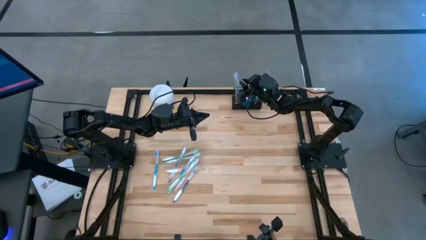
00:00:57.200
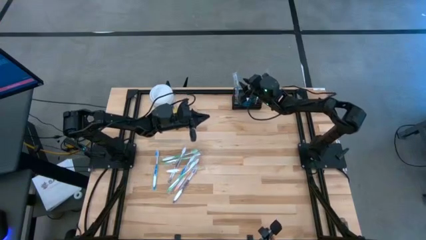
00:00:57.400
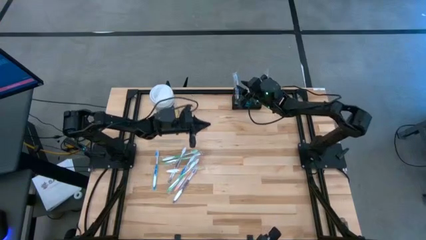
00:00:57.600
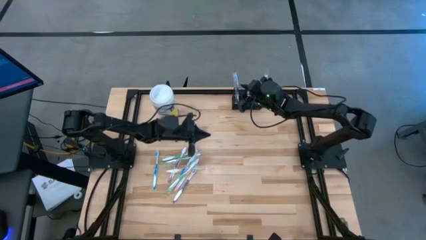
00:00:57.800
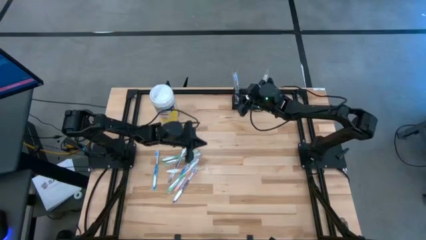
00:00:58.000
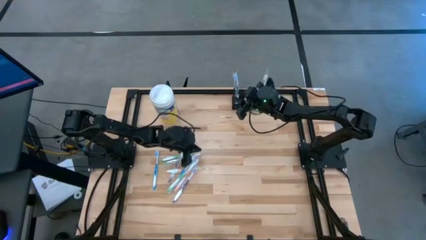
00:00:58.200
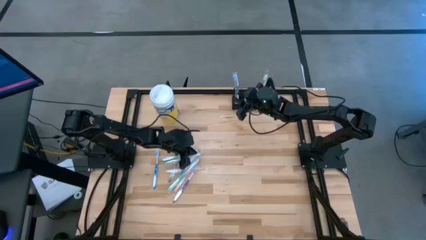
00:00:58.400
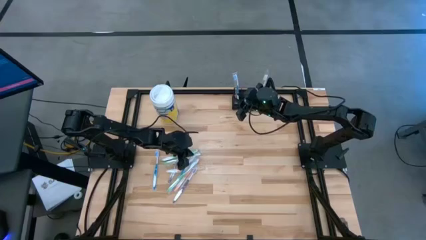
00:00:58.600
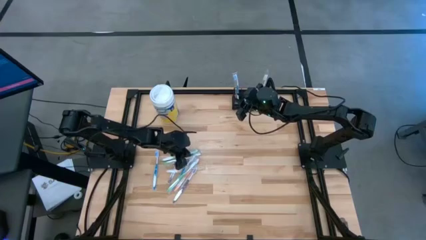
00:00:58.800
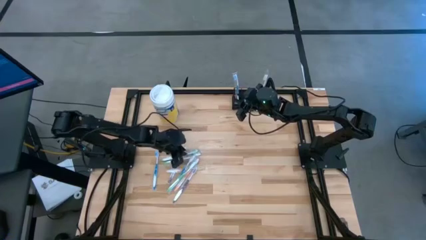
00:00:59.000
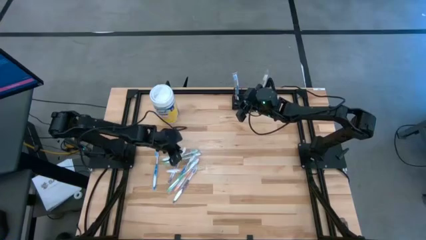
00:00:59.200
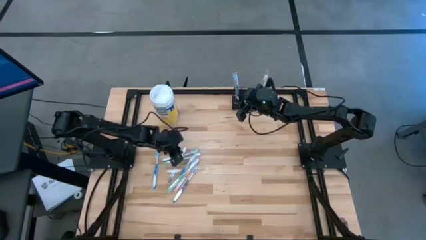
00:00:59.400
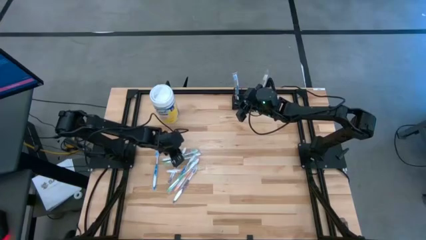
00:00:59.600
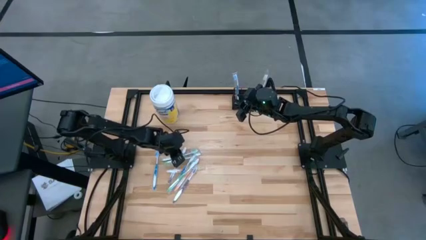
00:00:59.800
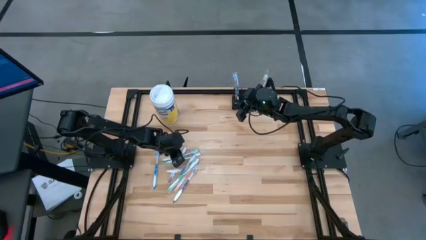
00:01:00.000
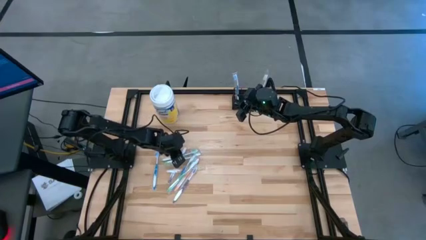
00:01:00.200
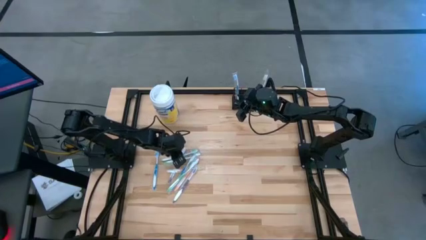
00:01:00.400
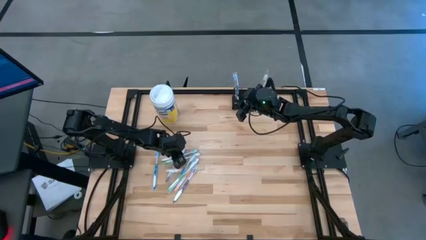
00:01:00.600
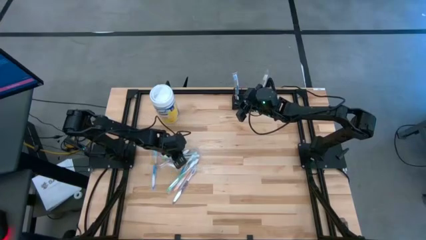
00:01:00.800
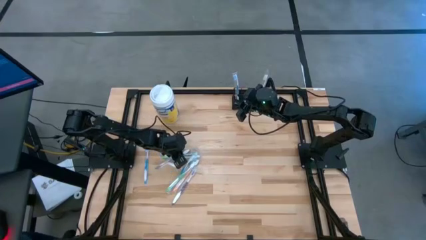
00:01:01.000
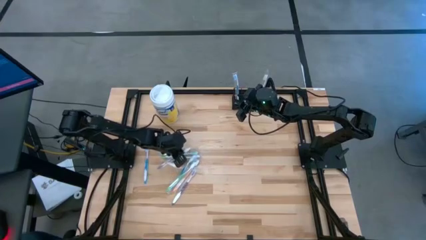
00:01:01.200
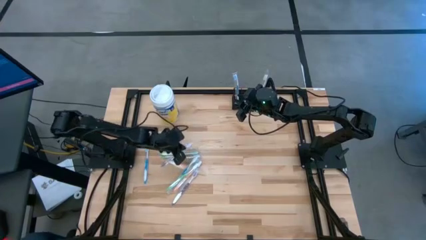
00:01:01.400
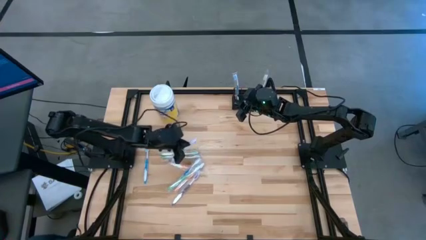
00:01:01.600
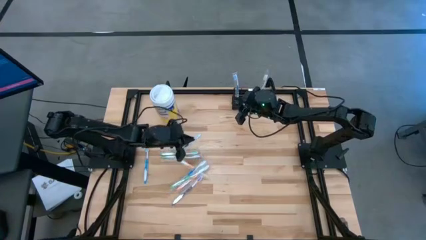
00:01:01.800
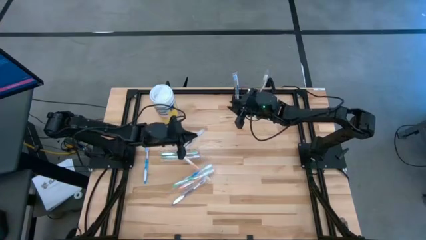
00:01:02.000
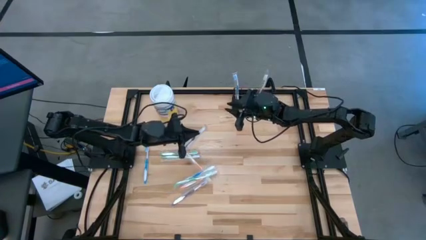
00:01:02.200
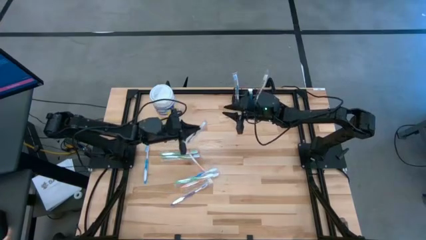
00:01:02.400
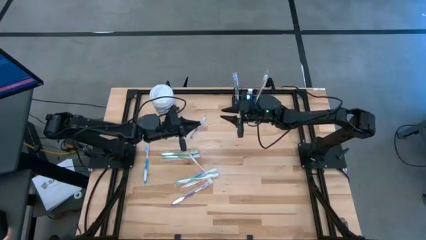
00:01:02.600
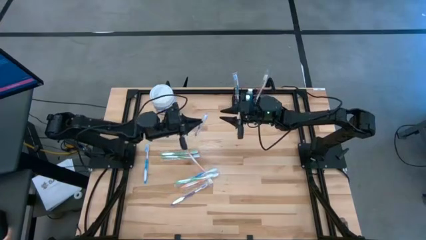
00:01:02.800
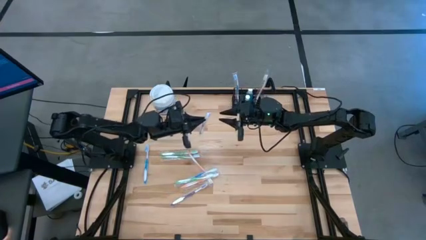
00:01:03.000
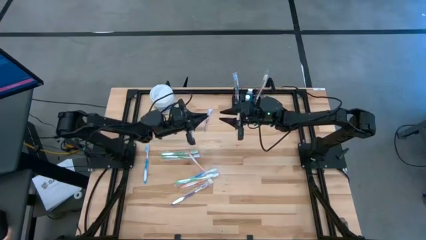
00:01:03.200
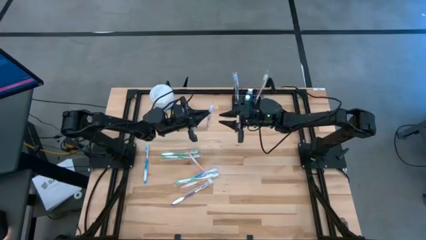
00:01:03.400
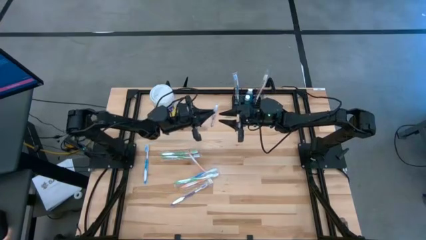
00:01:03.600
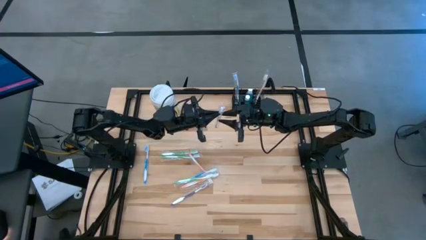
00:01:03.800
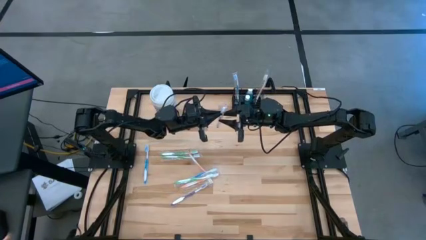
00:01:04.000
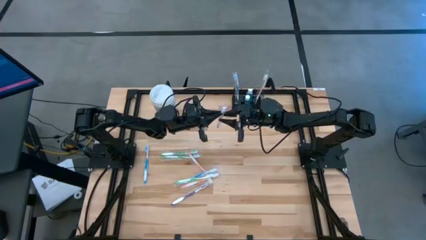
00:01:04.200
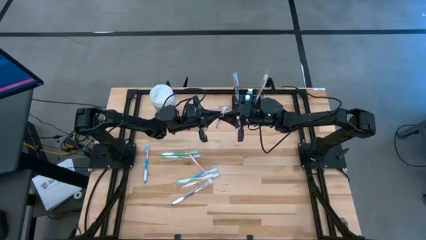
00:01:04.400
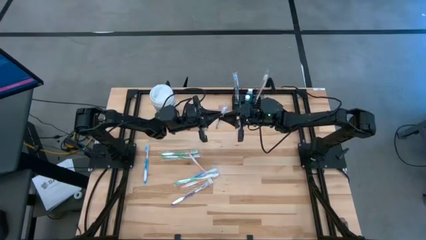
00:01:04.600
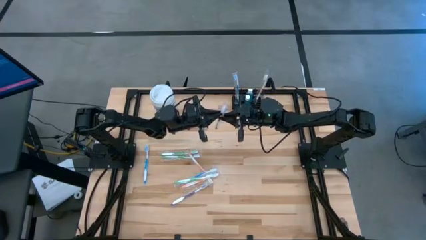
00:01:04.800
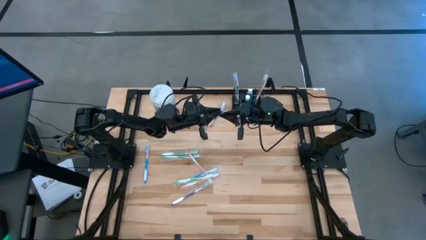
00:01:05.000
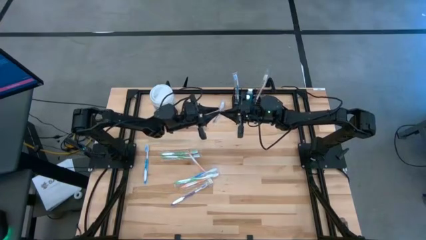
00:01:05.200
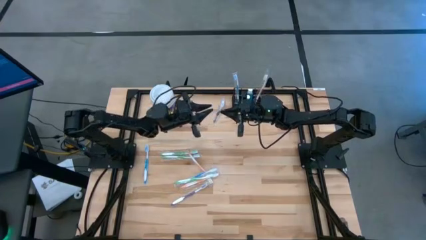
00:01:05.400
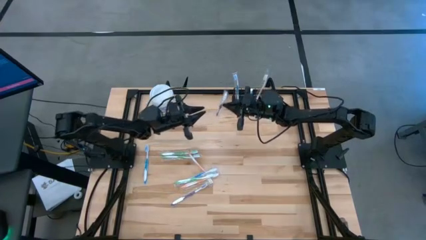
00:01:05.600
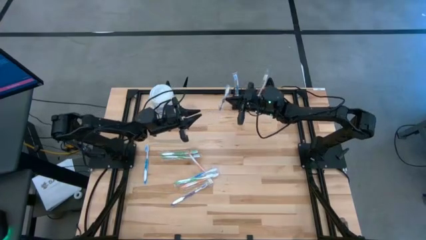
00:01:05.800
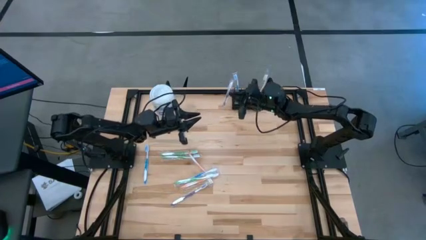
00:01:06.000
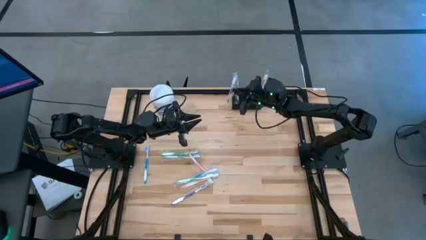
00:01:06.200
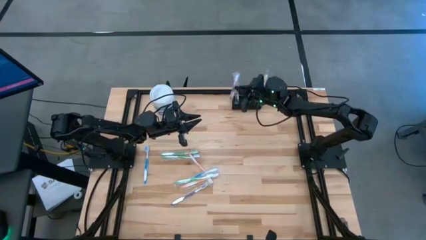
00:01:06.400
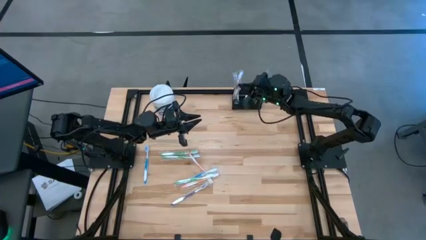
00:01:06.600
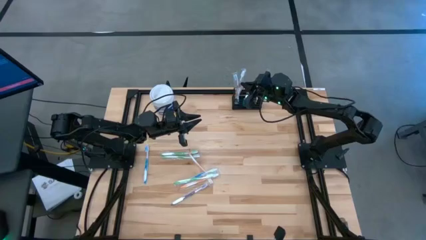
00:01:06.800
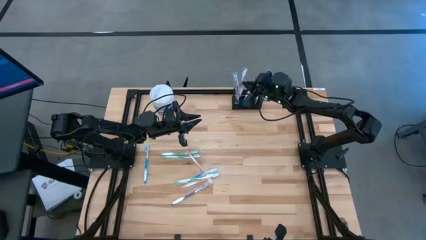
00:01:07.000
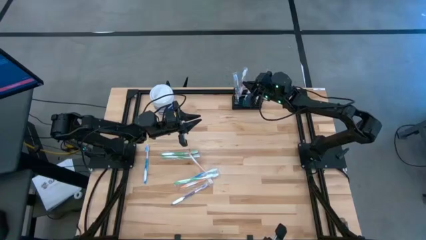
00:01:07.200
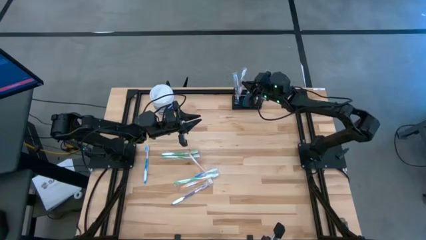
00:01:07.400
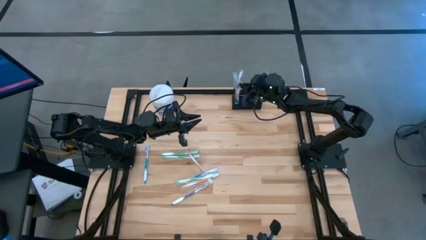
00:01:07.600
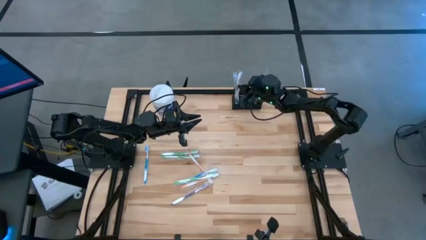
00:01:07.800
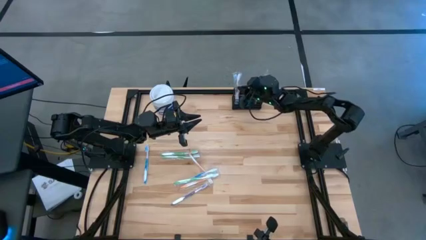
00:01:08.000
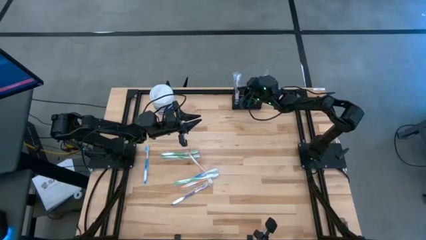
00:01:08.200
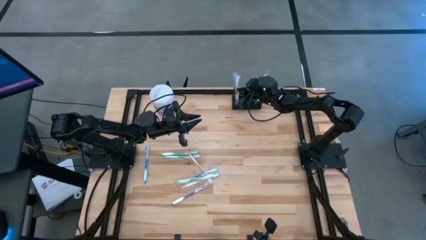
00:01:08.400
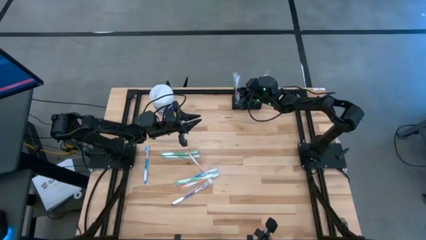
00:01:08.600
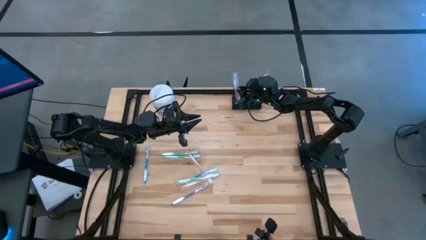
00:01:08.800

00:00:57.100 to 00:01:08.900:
Task: Pick & Place toothbrushing station
Put the violet toothbrush into the black mesh organizer

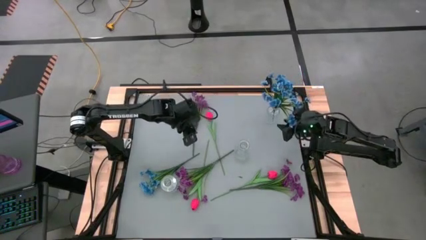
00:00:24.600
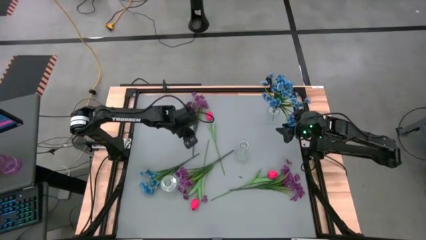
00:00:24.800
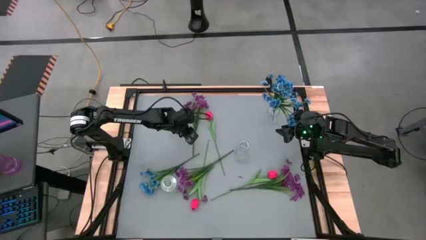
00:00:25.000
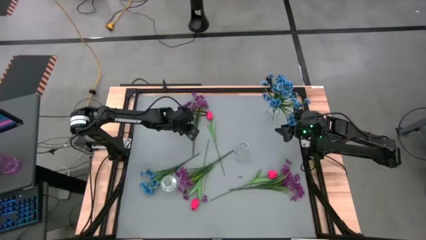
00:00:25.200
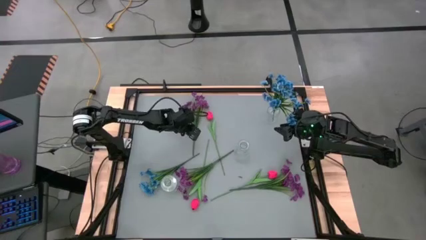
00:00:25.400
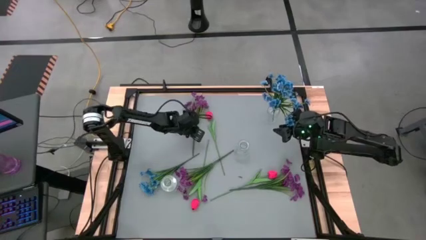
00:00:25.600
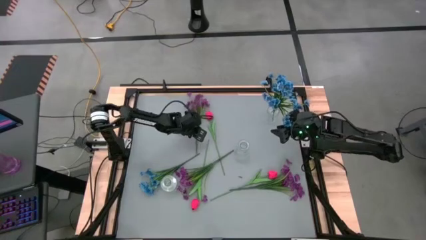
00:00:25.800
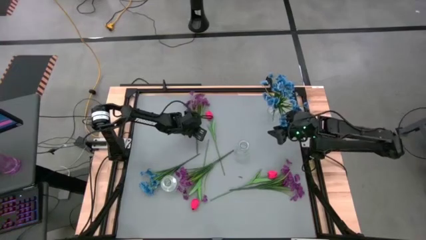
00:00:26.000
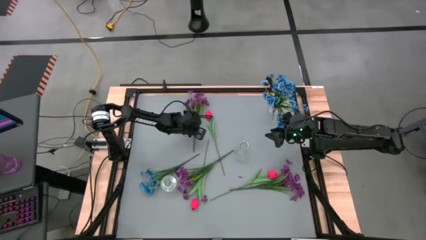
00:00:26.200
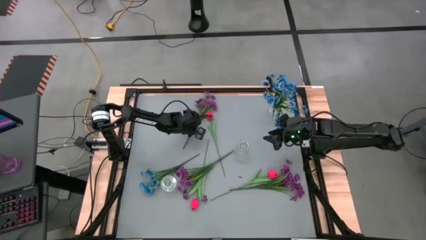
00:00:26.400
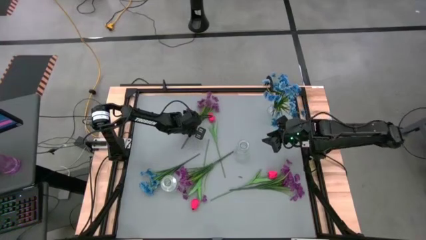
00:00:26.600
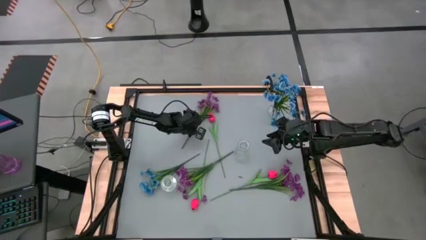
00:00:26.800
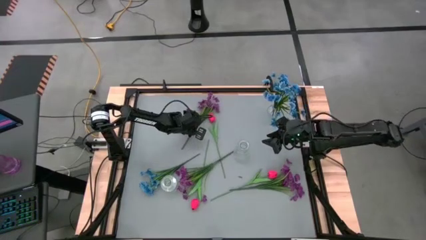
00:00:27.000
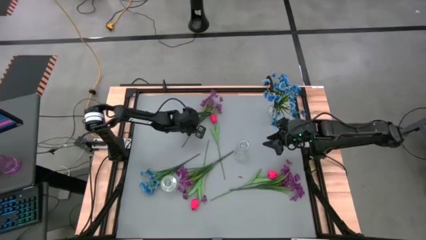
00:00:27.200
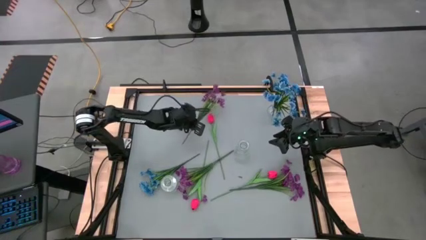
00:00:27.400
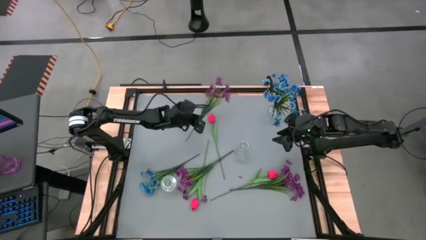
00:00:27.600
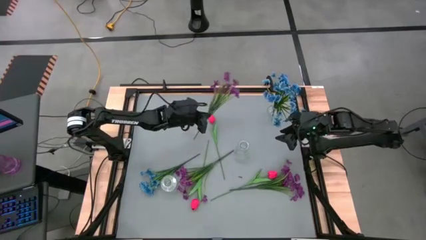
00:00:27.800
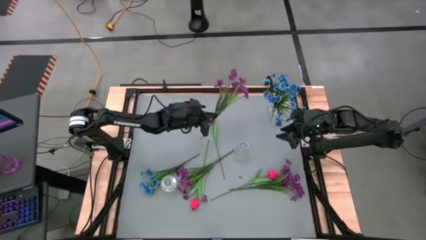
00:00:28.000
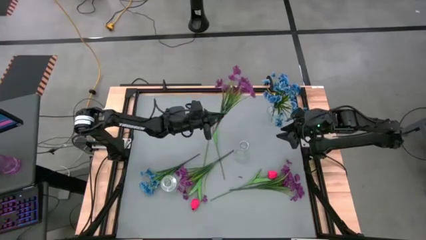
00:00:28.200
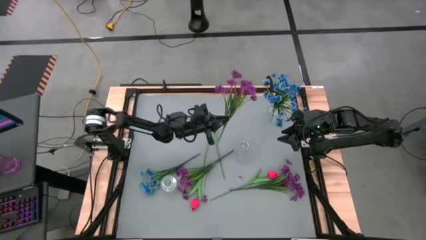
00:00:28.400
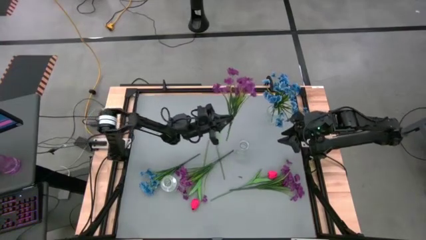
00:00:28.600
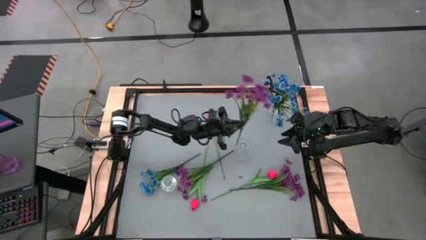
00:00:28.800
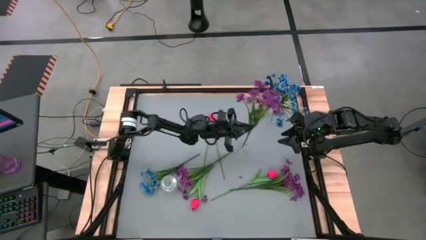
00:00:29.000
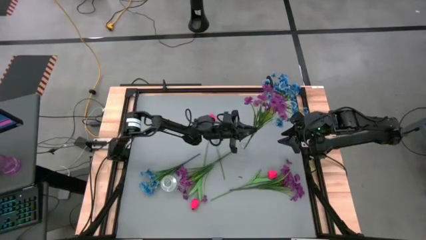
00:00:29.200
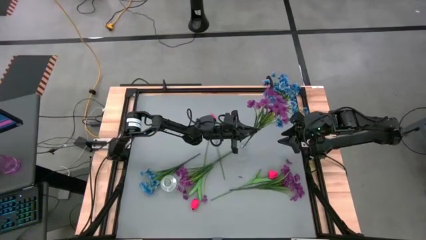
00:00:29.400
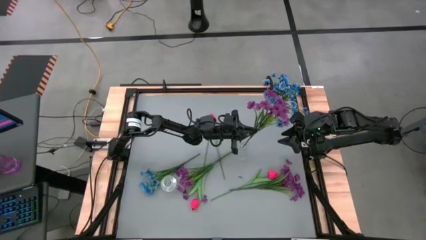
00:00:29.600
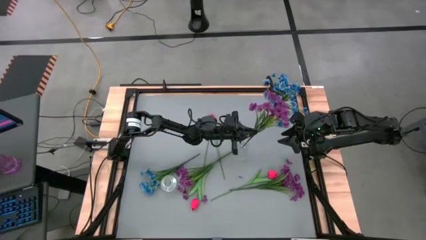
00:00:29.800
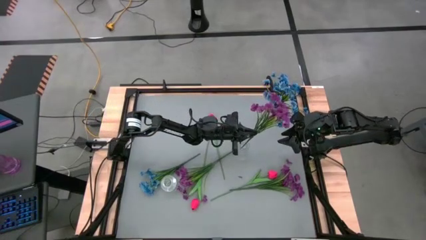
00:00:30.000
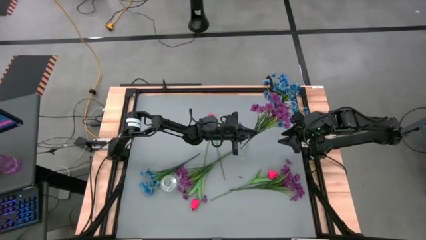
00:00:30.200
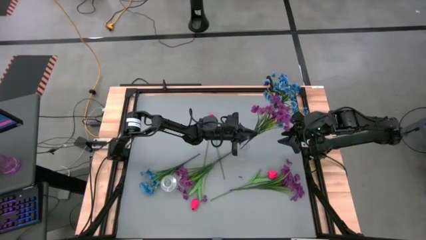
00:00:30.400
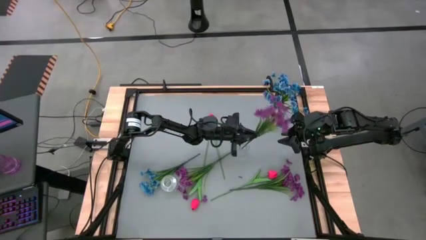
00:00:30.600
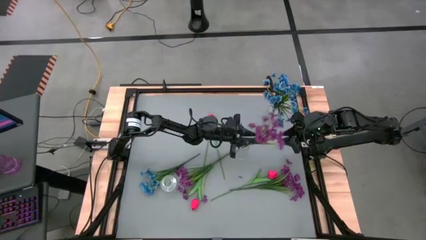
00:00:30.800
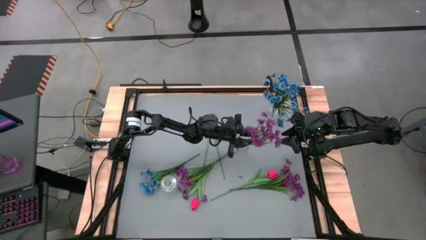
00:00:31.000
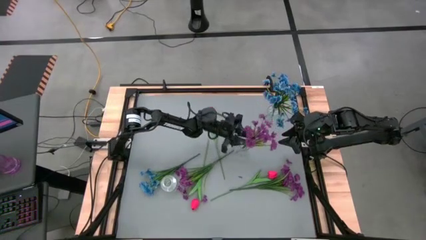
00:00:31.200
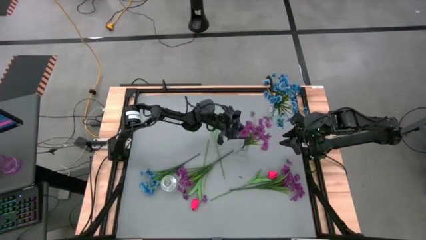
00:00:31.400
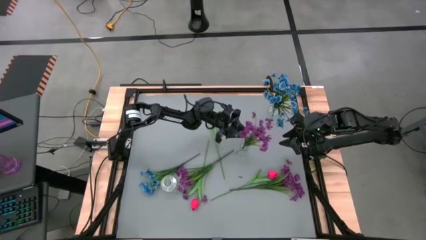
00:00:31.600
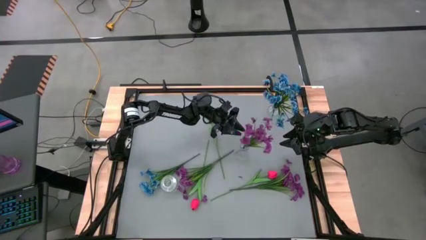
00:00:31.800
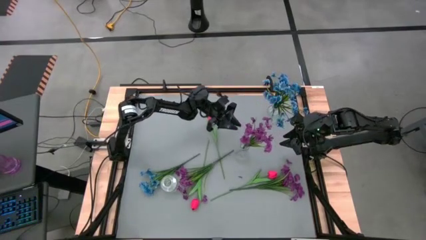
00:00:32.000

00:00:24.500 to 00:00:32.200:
Task: Sort flowers into vase by color
Put the top violet flowers into the middle transparent vase
